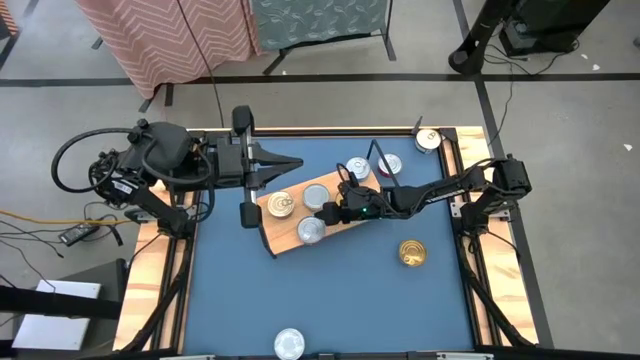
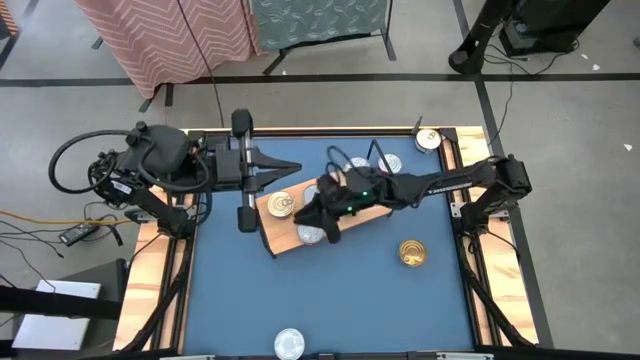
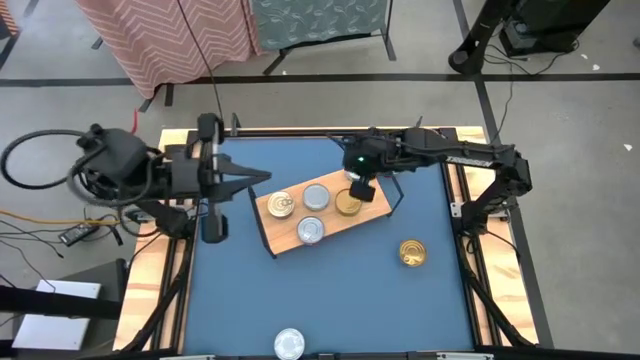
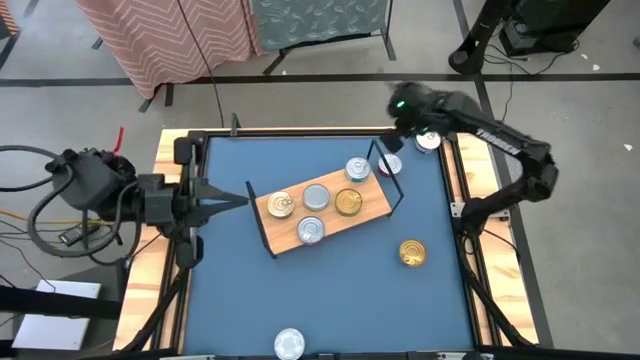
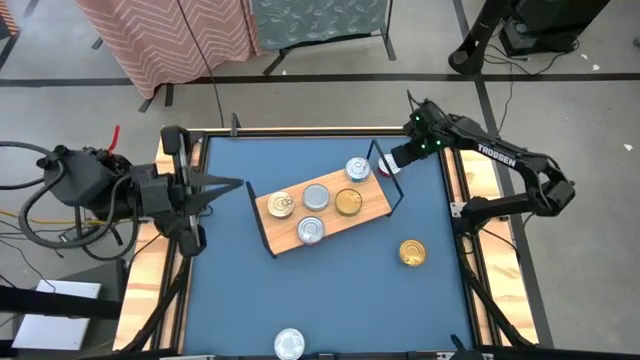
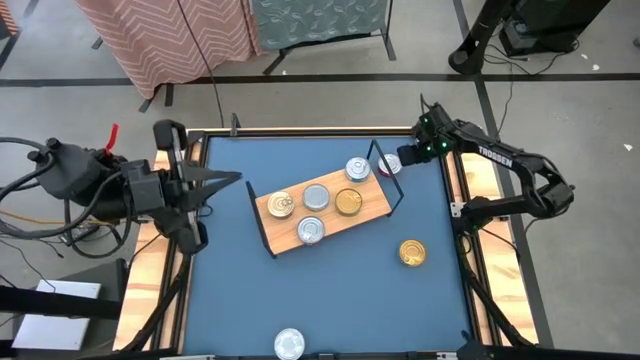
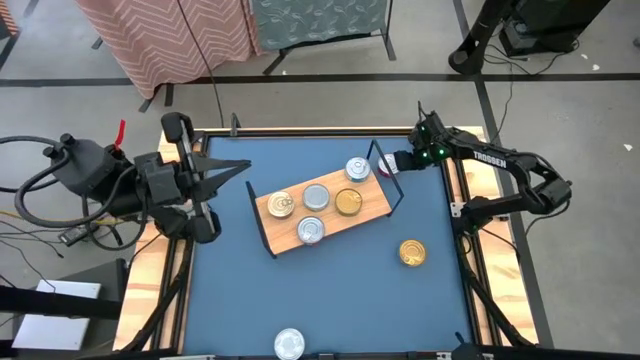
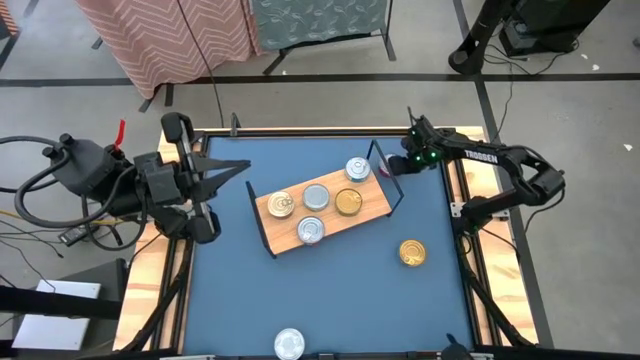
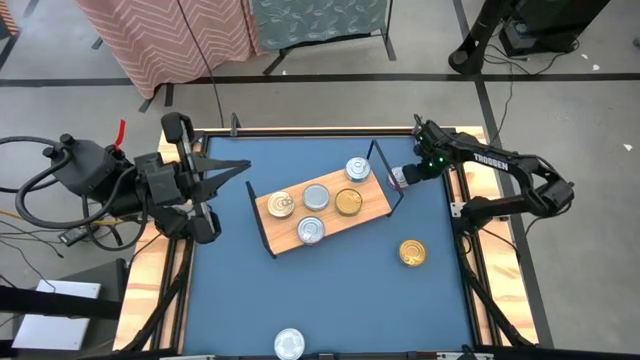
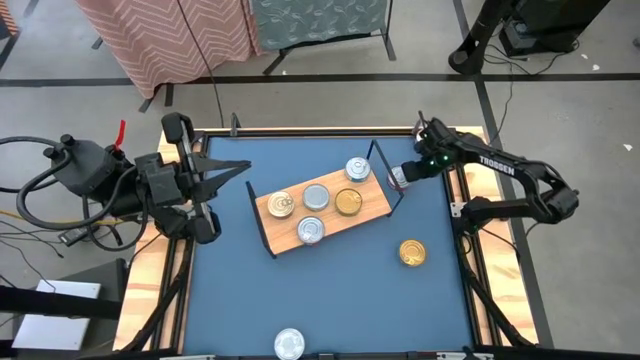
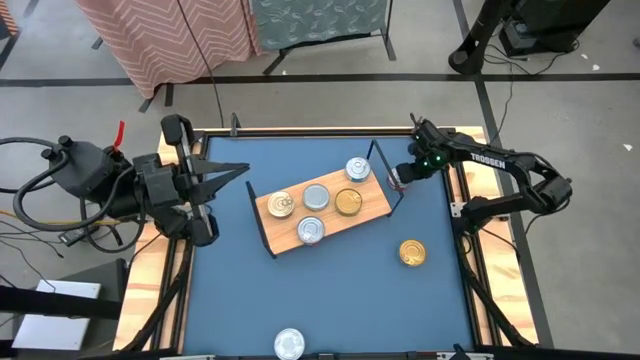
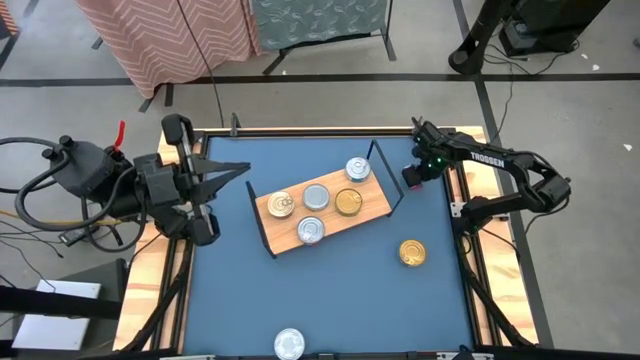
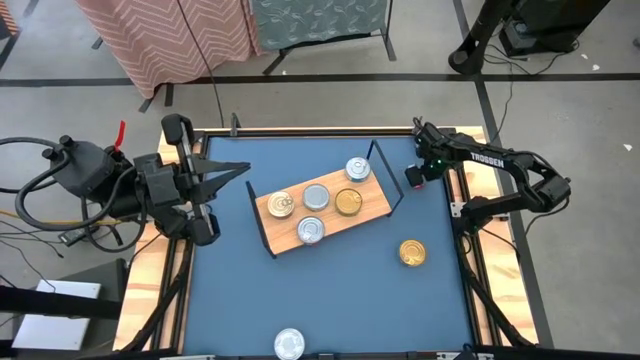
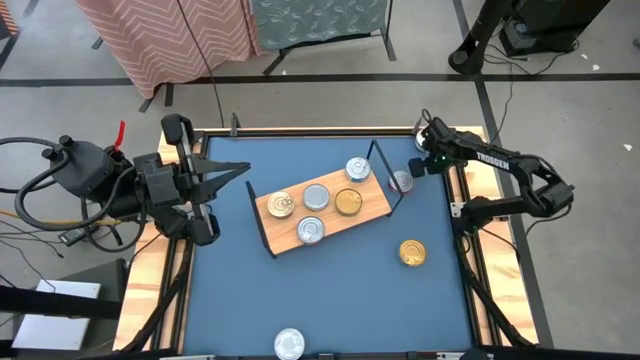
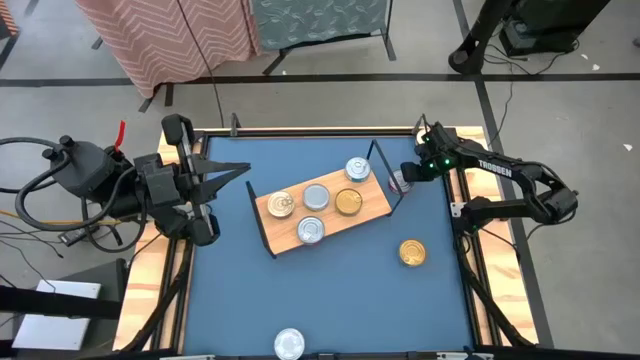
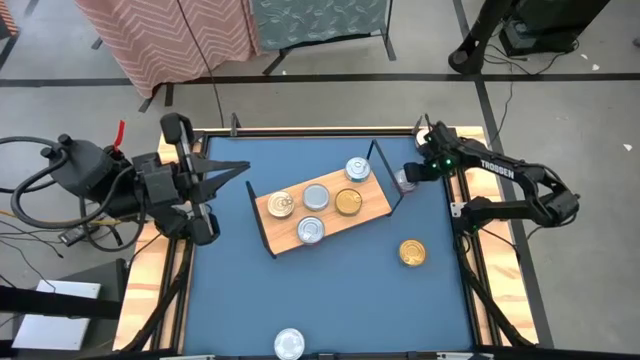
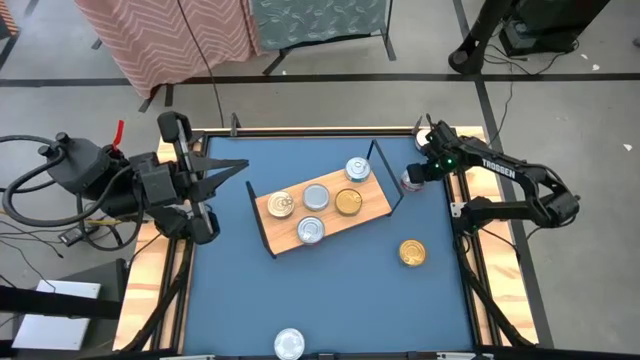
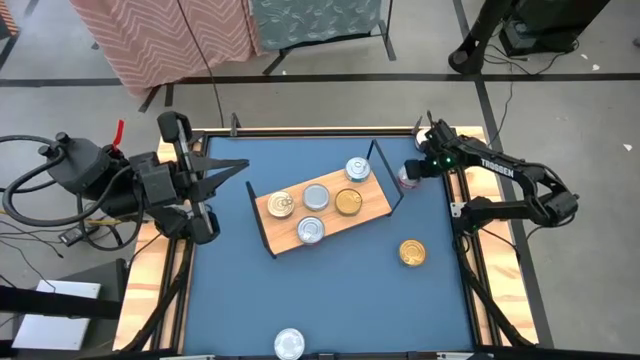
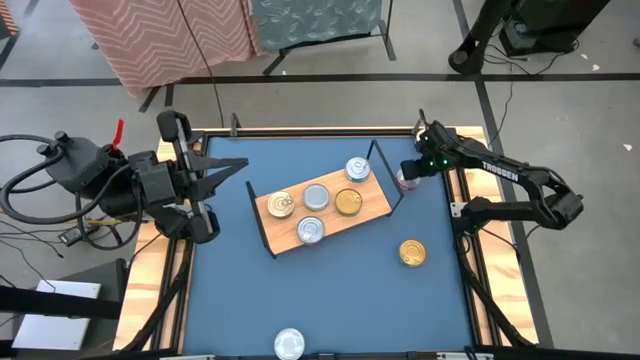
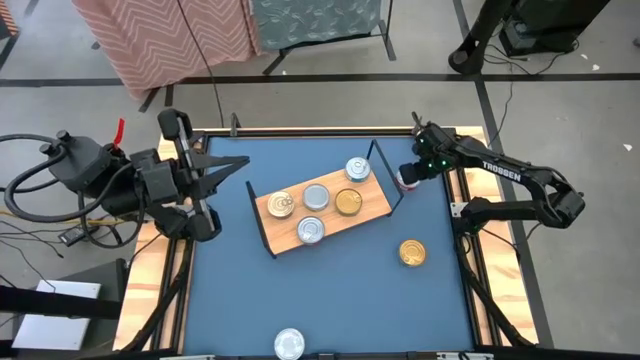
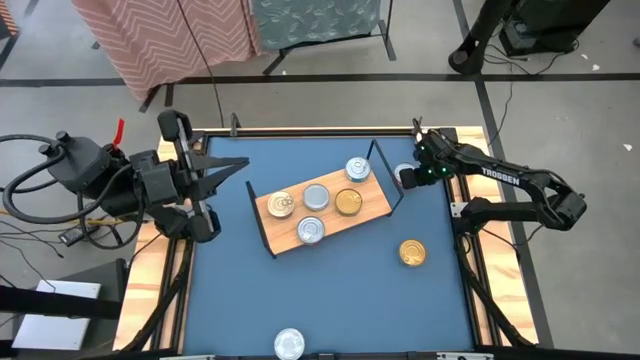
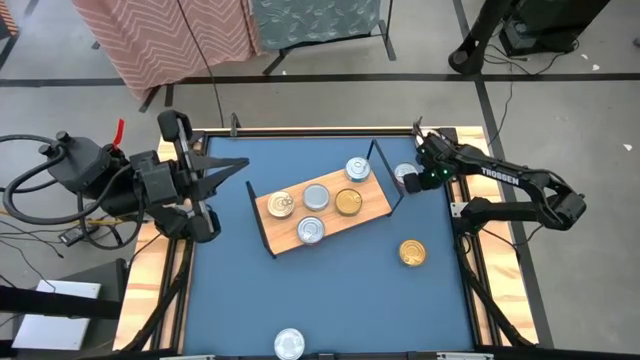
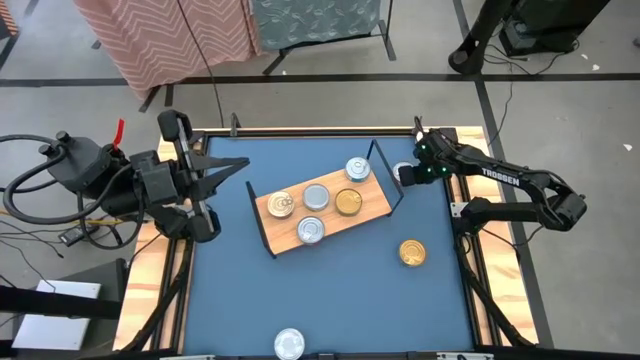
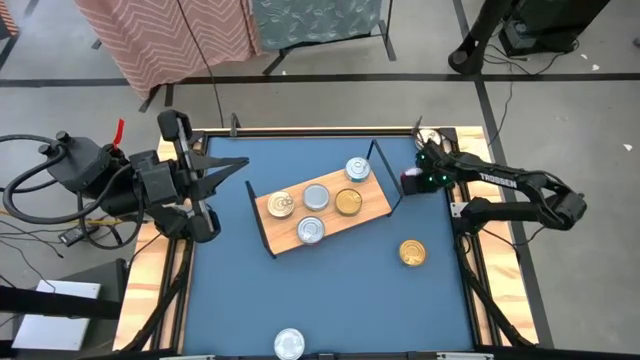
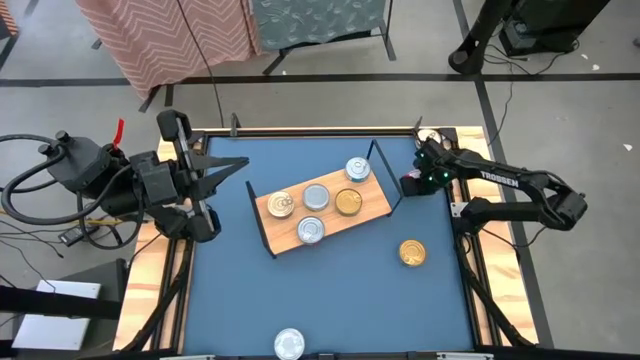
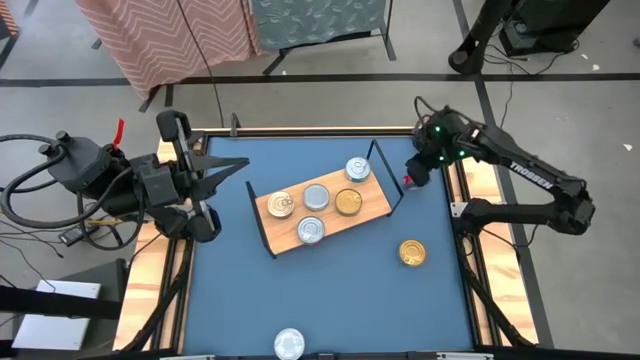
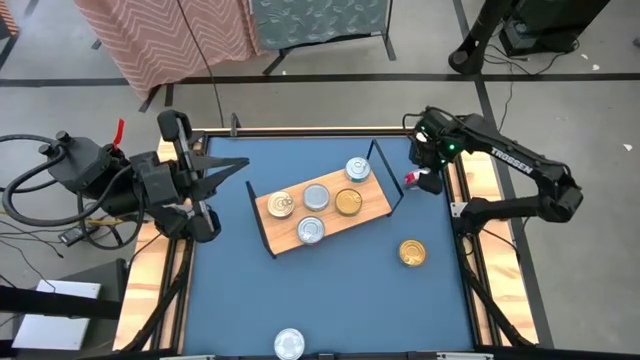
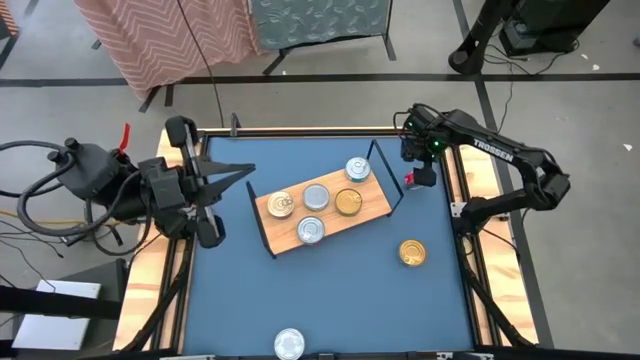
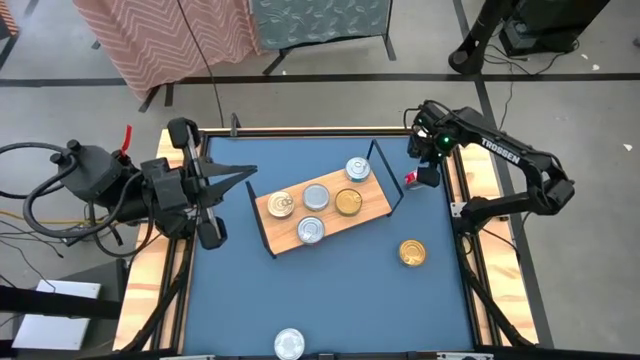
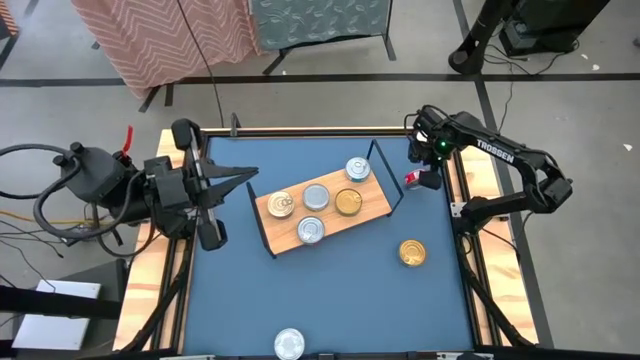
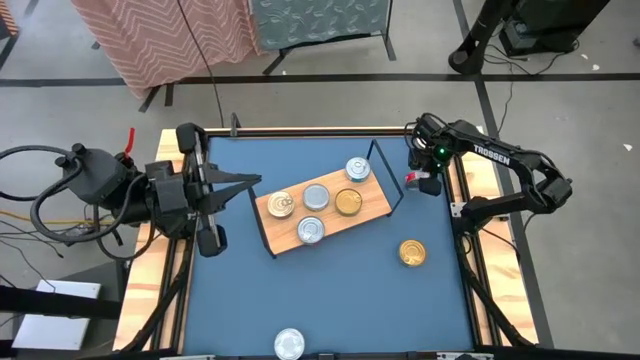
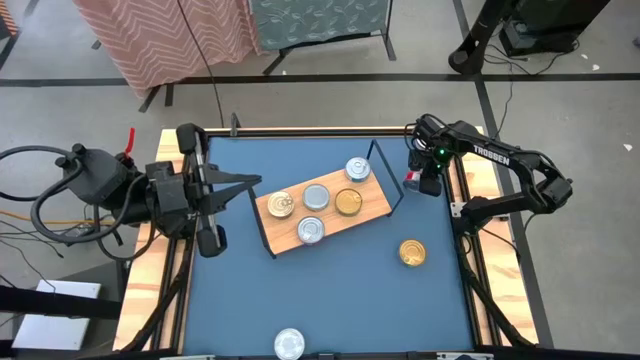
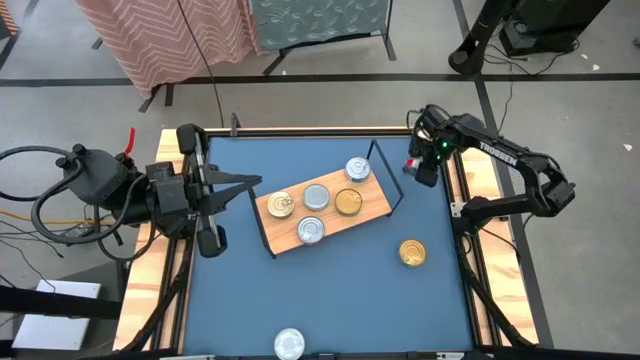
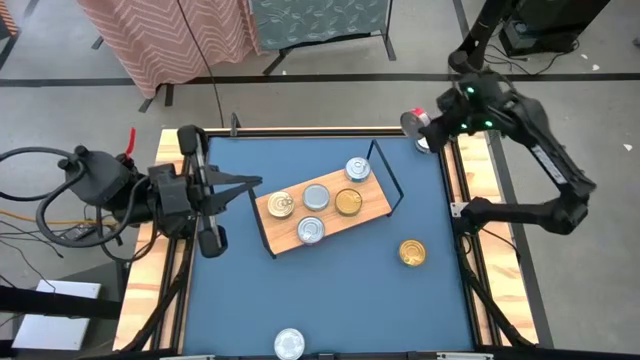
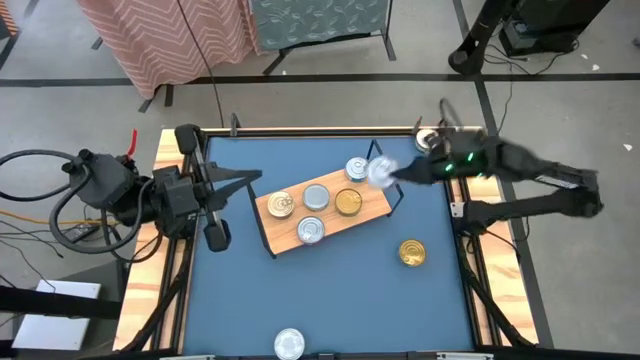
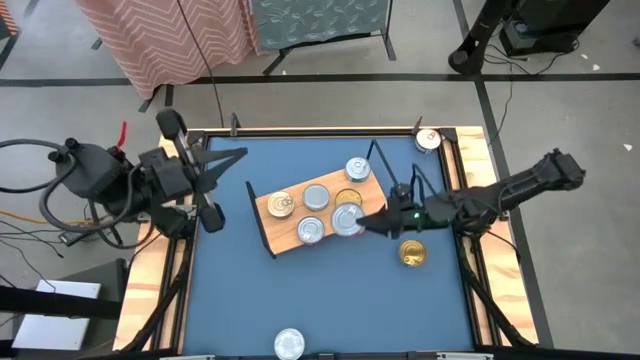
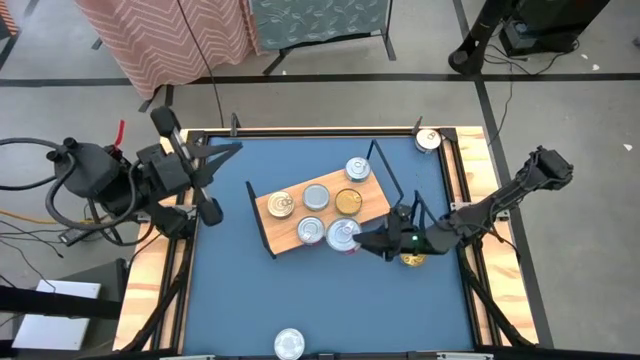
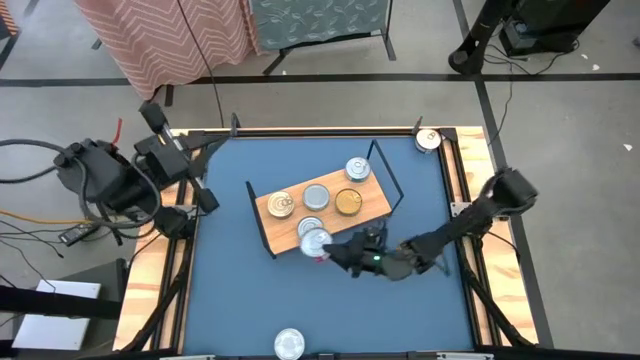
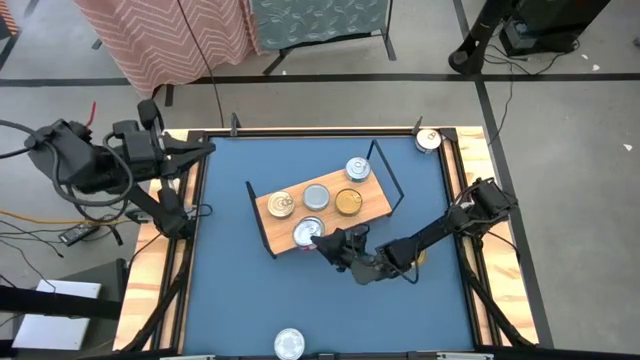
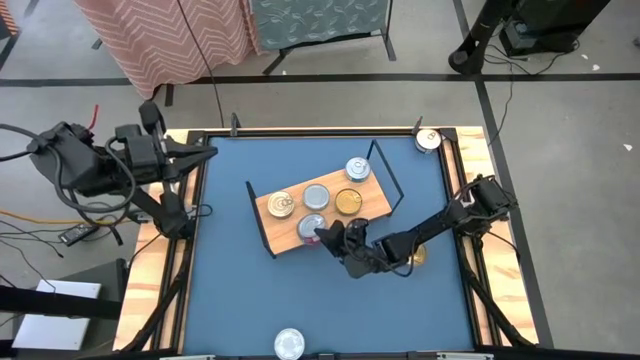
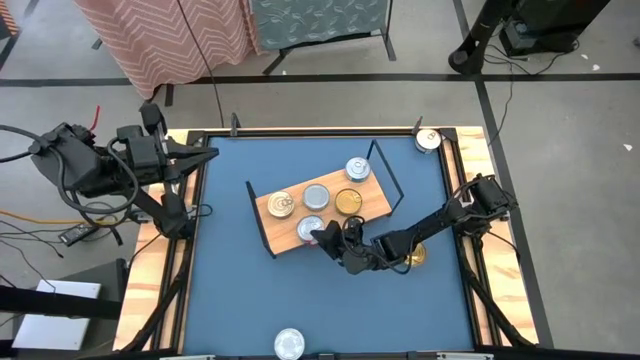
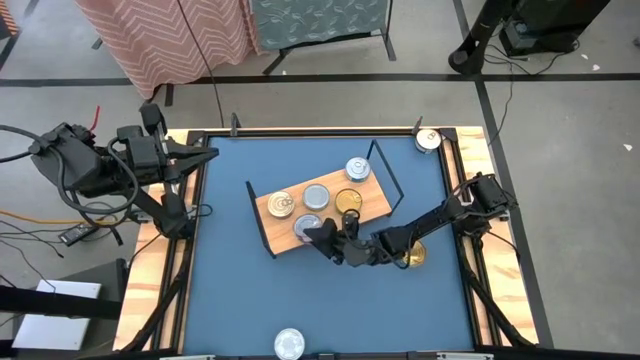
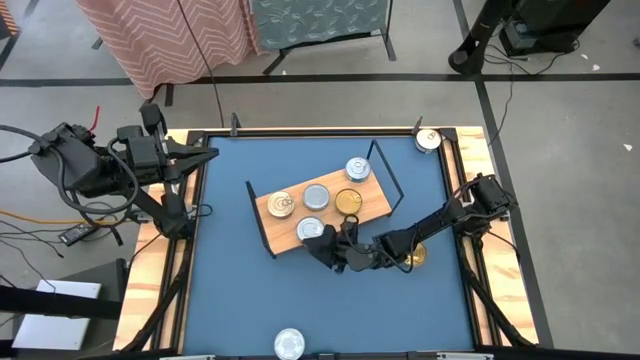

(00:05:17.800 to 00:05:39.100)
Task: Stack canned seafood by type on shelf
Stack the red tuna can on top of the red tuna can on the shelf
